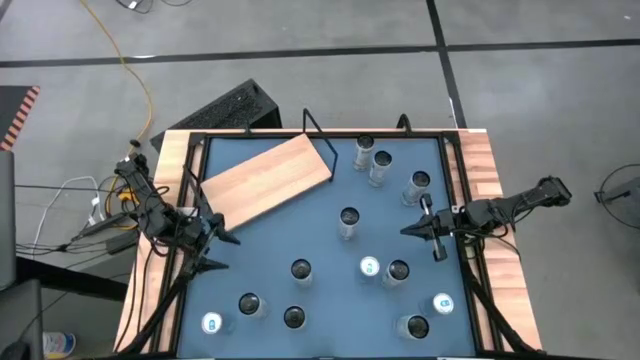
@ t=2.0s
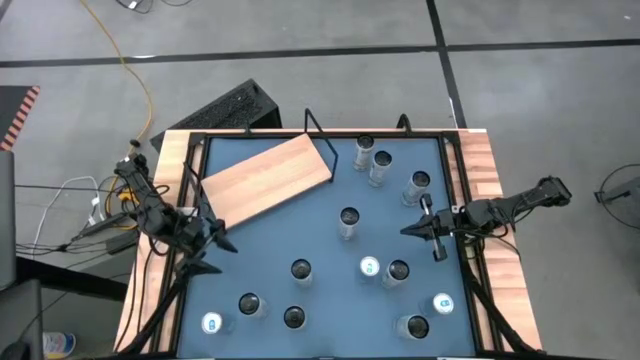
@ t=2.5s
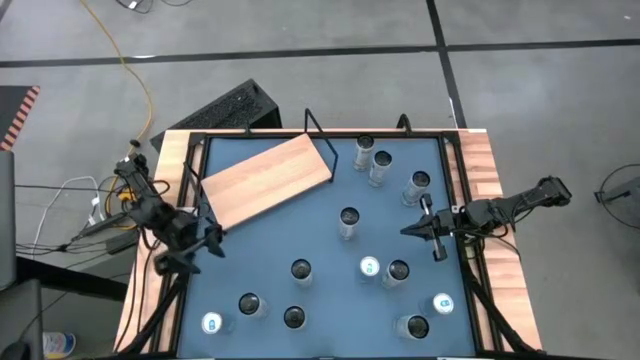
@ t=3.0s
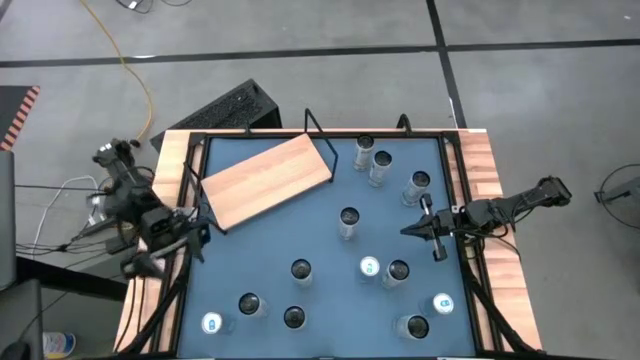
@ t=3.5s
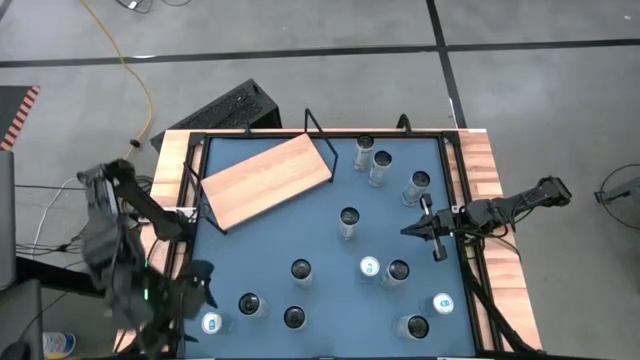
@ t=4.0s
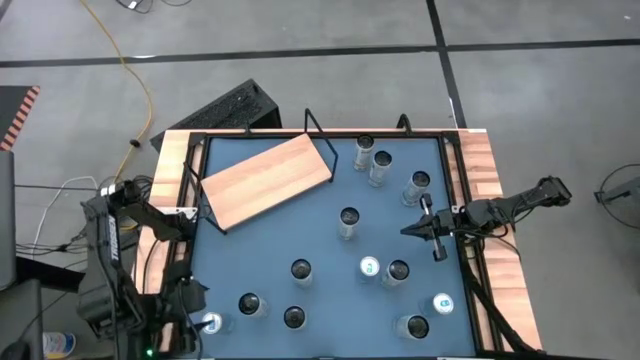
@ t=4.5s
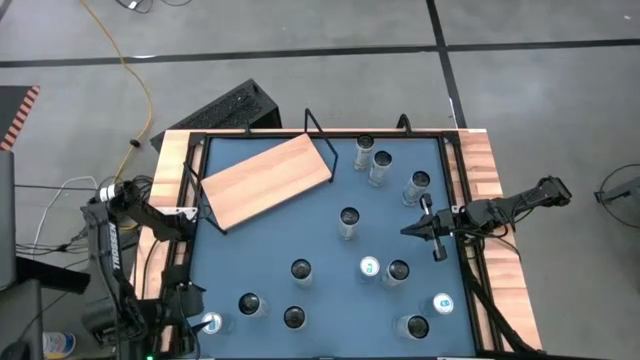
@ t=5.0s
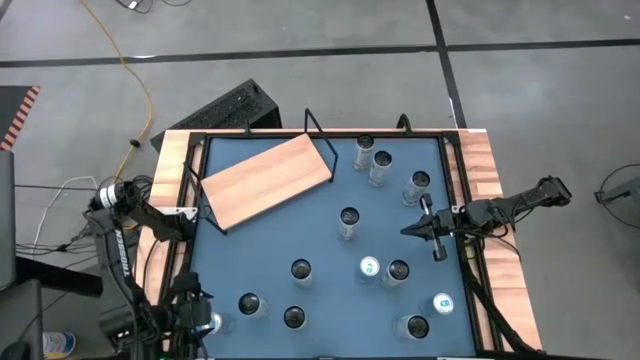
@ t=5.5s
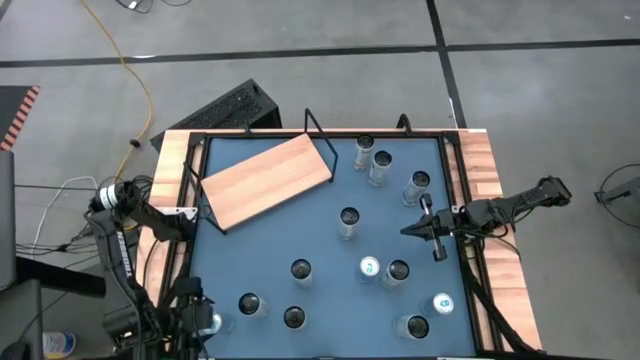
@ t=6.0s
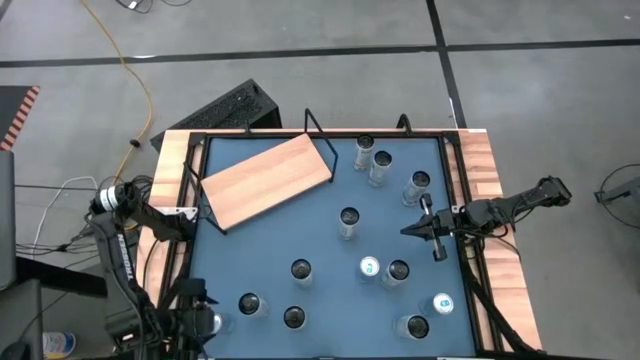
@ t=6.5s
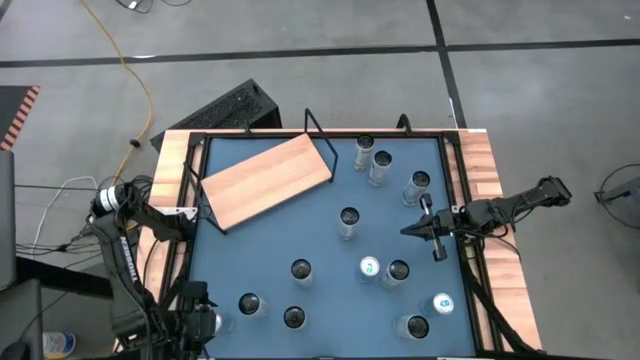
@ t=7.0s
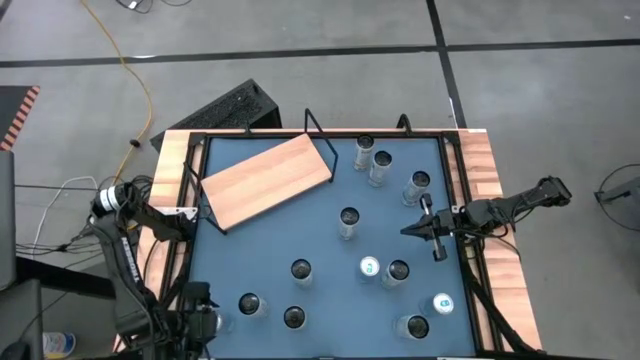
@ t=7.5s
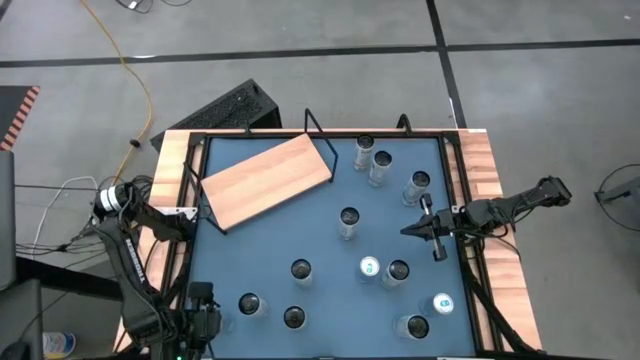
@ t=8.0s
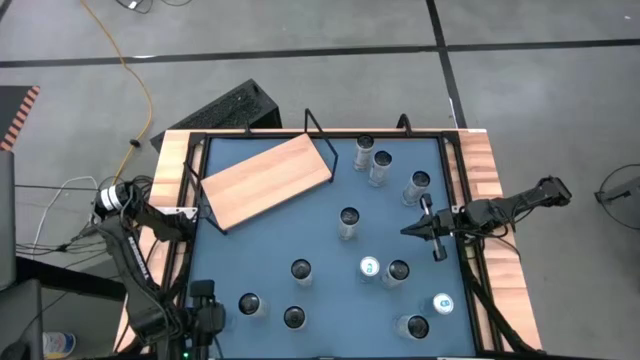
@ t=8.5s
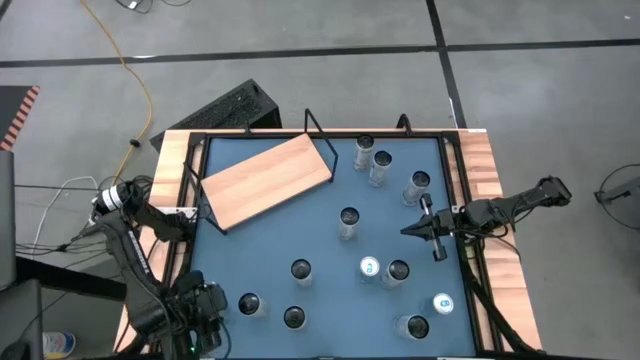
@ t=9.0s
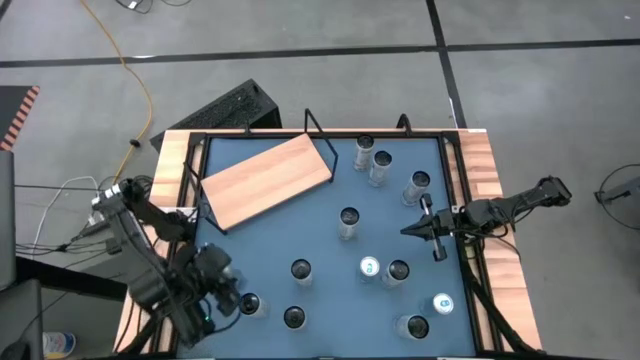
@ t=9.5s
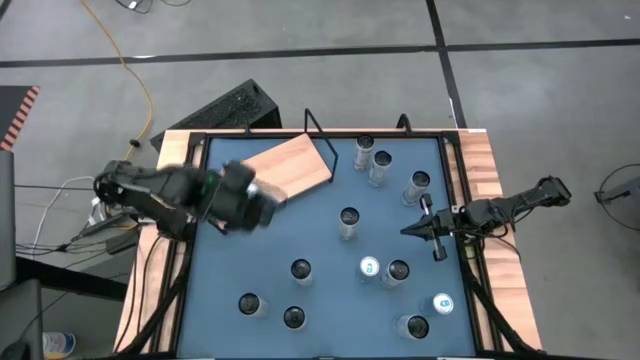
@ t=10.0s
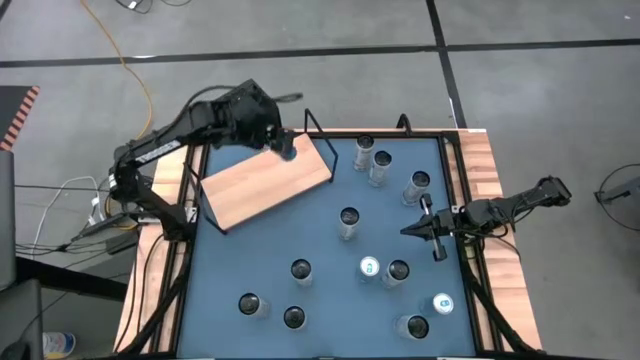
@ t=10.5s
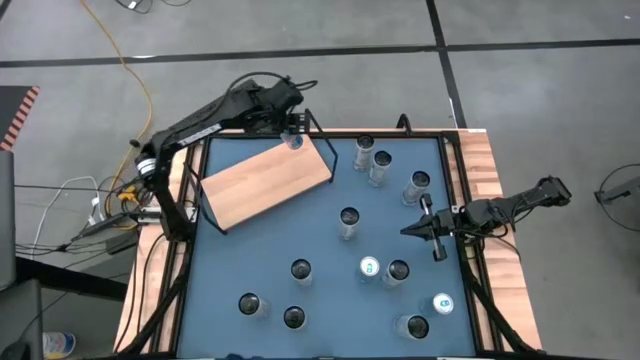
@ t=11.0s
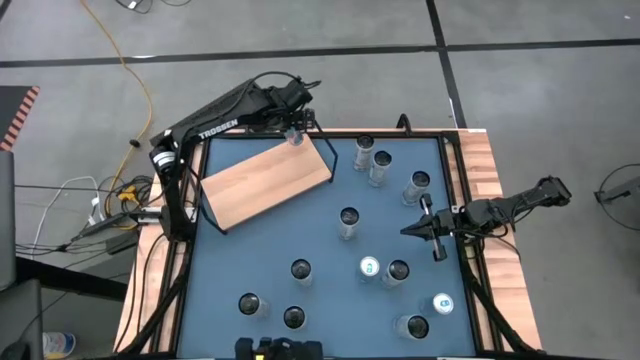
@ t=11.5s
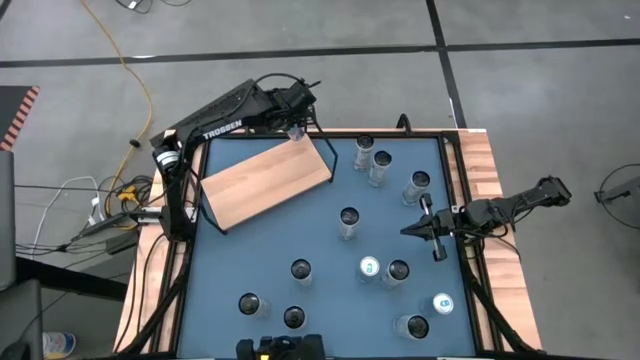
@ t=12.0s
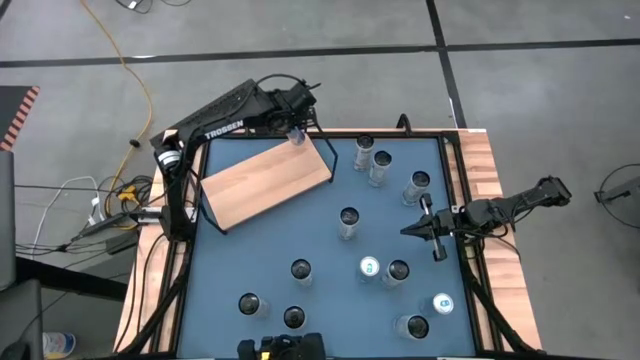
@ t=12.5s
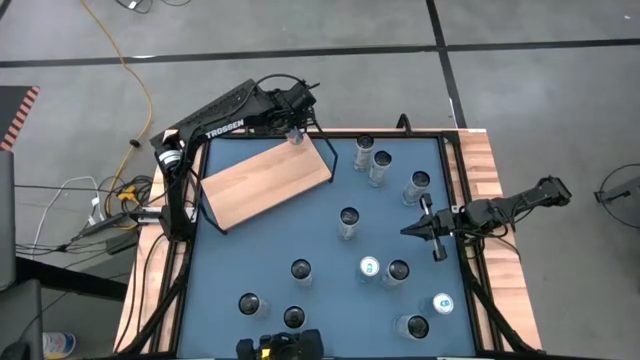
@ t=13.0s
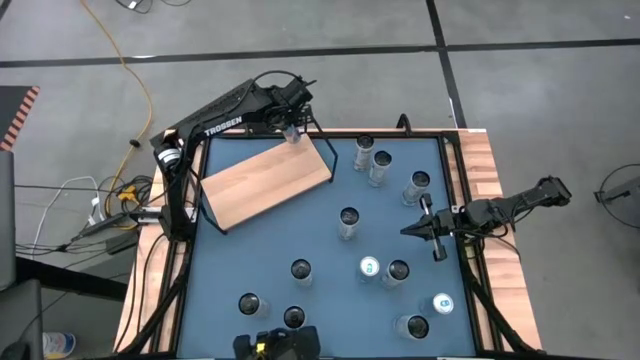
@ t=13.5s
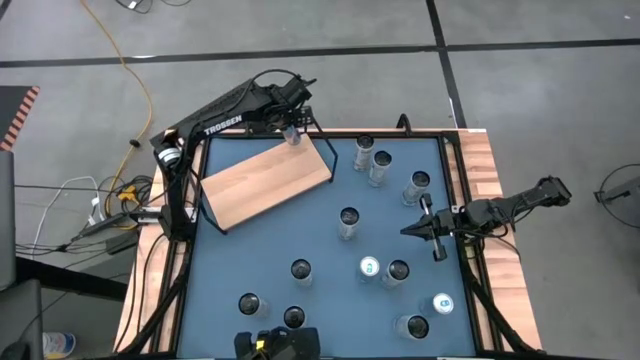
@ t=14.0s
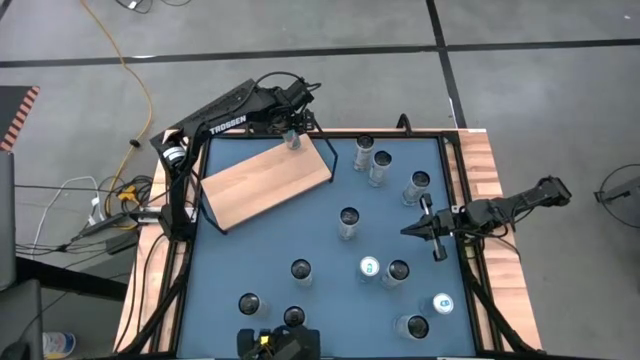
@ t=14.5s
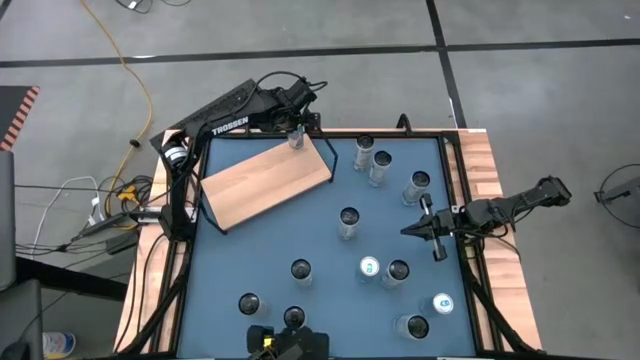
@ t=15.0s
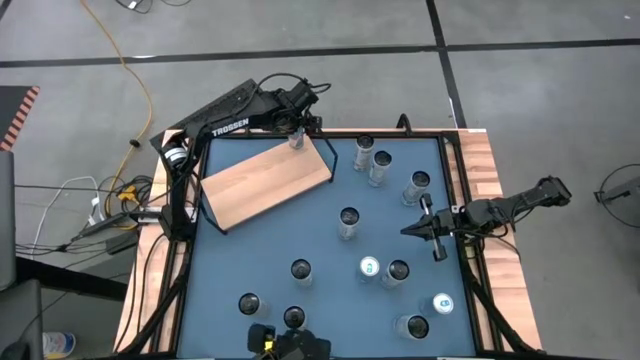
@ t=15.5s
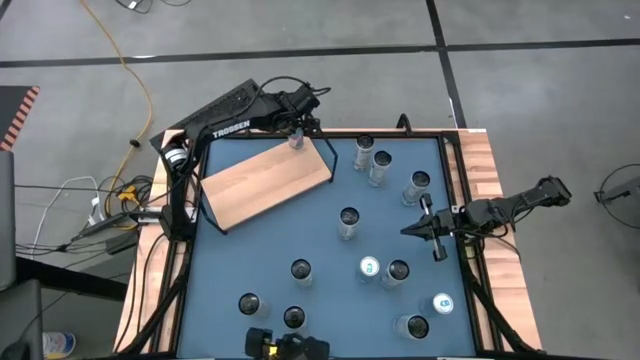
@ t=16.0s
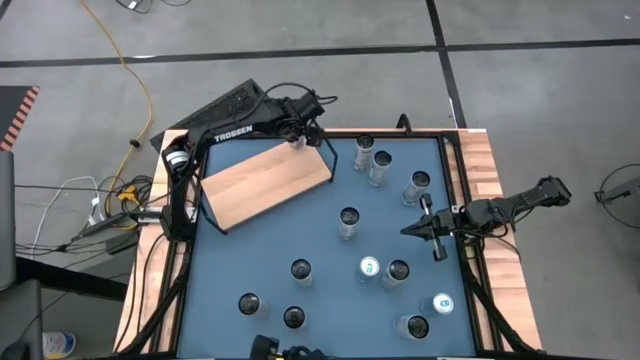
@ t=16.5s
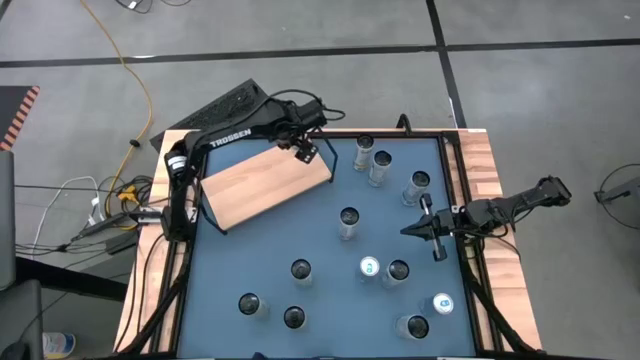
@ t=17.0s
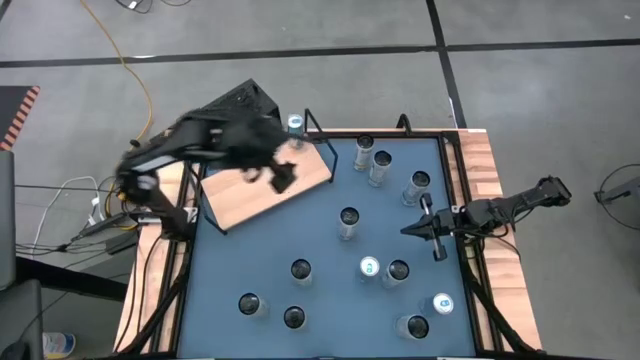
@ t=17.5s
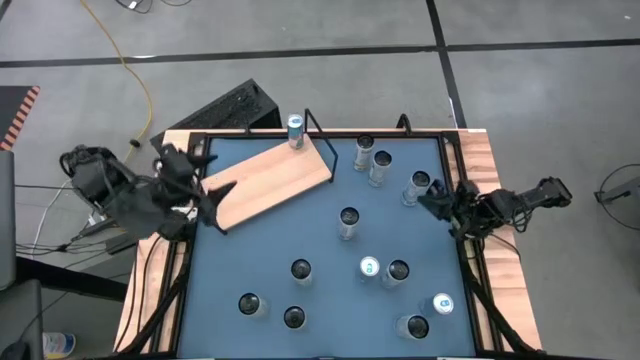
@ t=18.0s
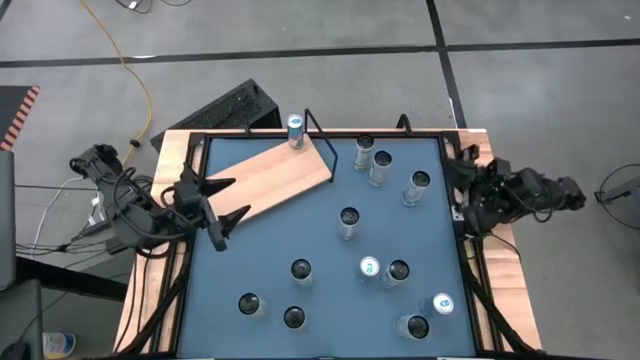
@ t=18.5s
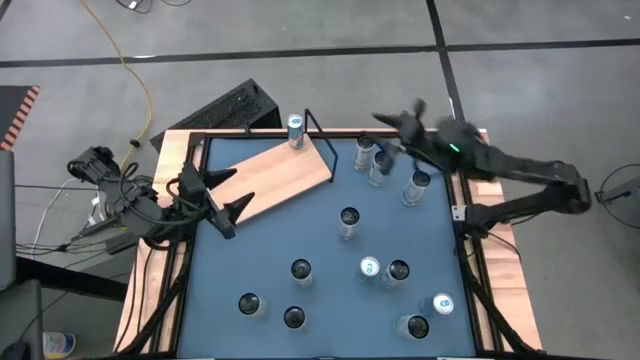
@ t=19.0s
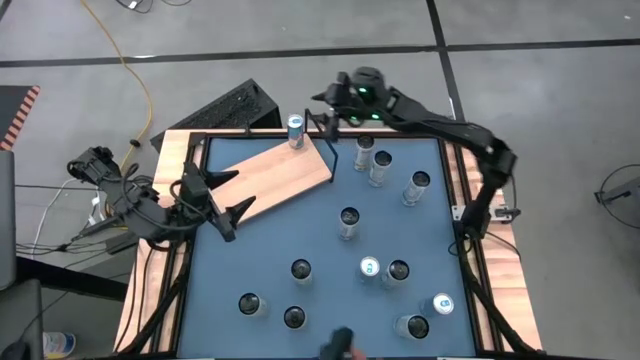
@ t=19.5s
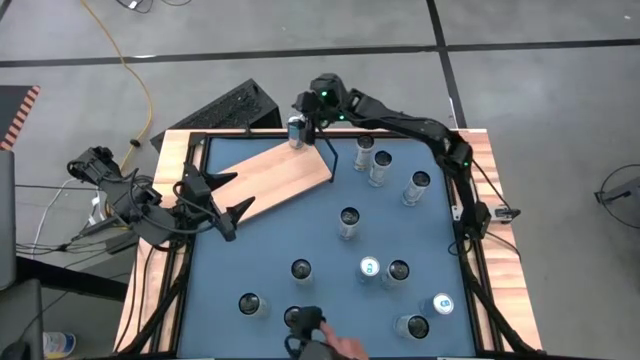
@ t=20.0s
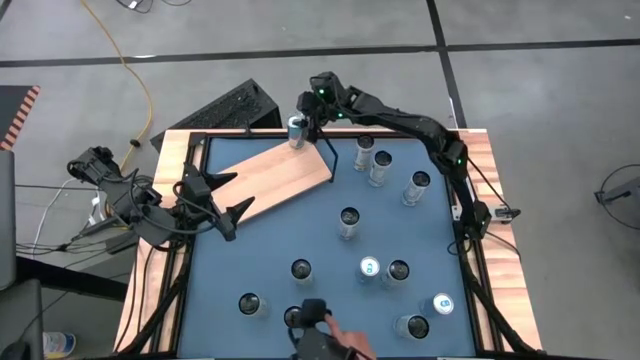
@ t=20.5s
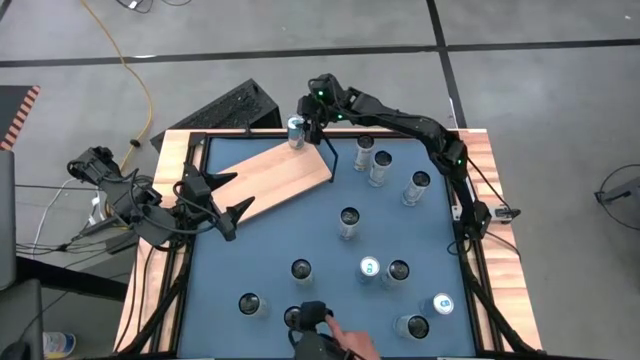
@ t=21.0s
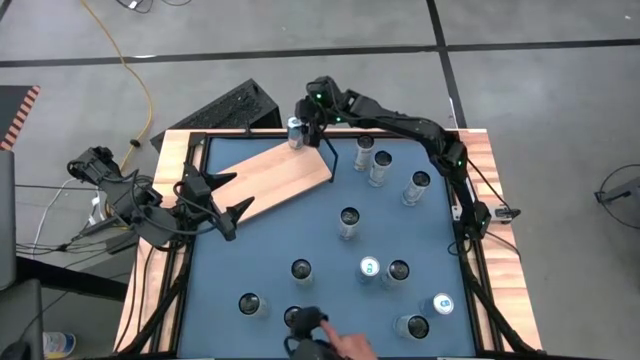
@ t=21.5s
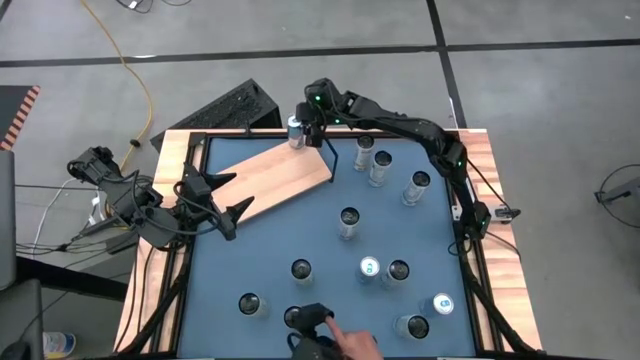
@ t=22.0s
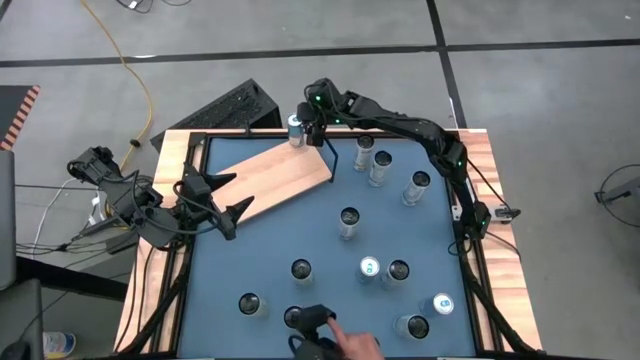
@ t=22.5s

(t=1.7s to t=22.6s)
Task: Place canned beverage on shelf
Put the left blue soda can on the shelf
